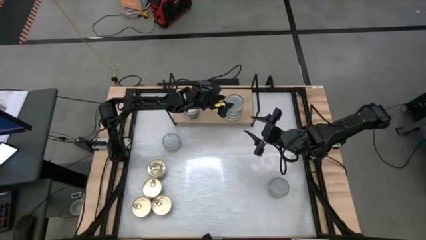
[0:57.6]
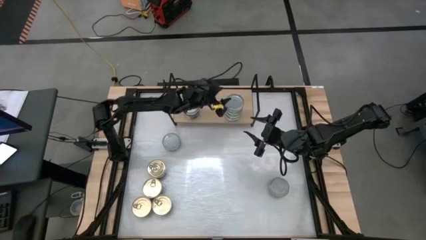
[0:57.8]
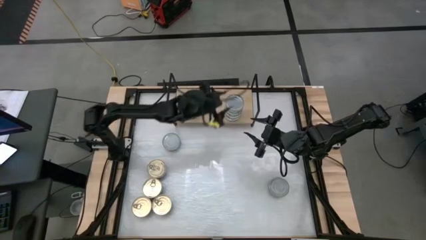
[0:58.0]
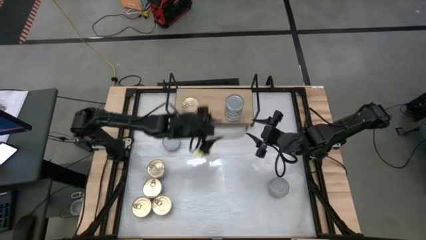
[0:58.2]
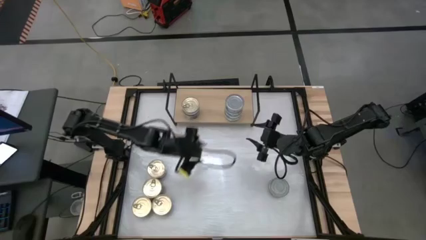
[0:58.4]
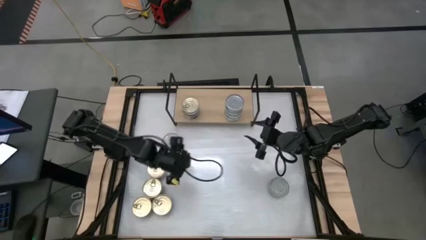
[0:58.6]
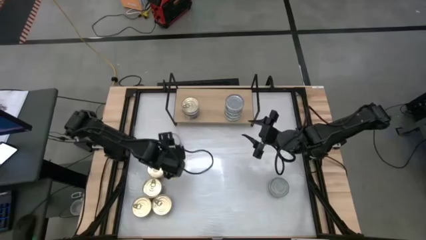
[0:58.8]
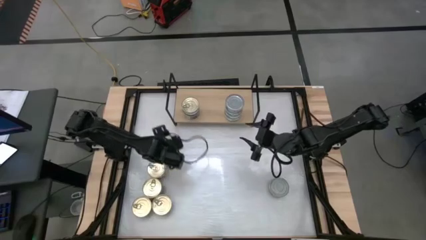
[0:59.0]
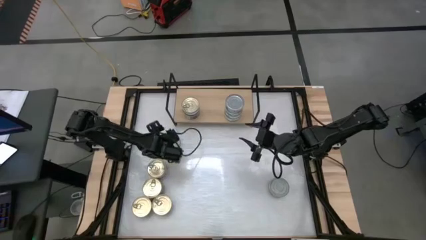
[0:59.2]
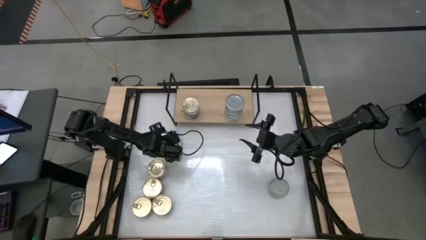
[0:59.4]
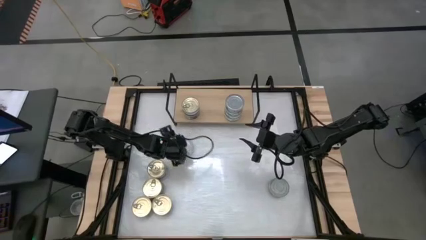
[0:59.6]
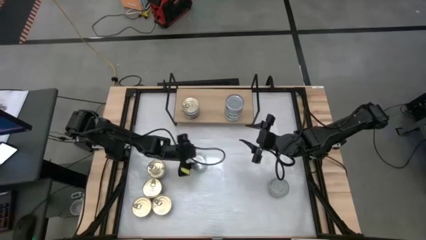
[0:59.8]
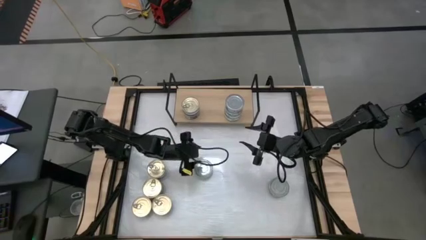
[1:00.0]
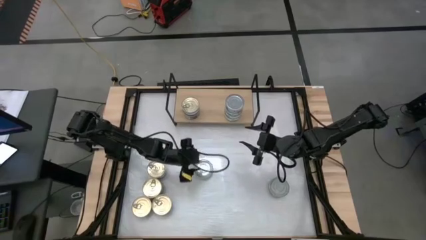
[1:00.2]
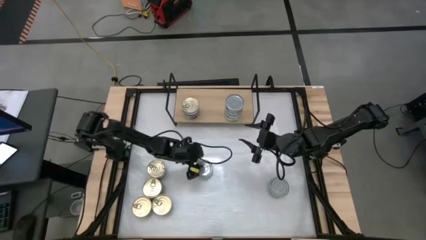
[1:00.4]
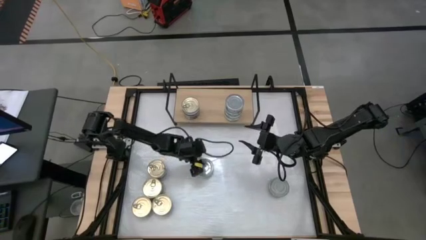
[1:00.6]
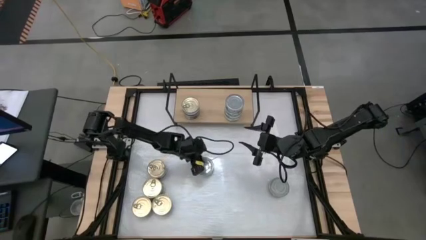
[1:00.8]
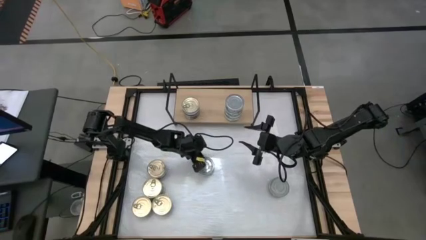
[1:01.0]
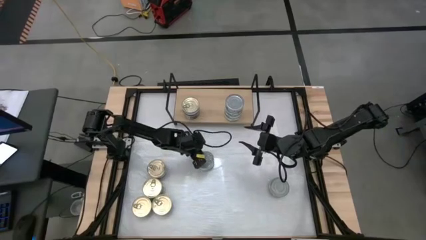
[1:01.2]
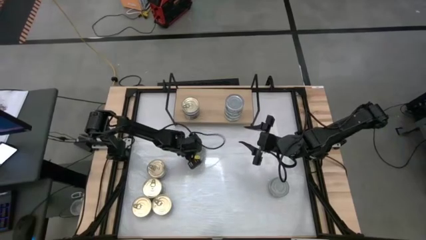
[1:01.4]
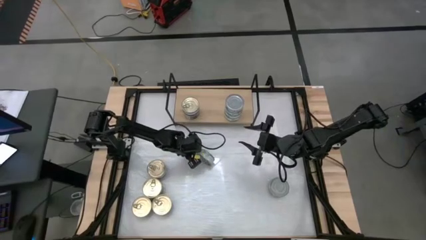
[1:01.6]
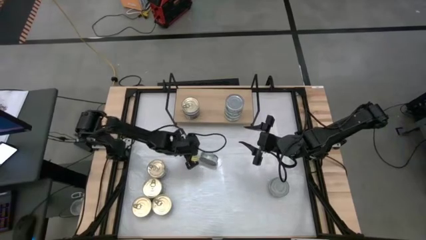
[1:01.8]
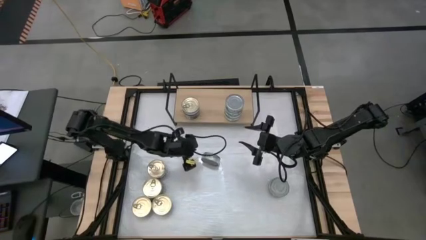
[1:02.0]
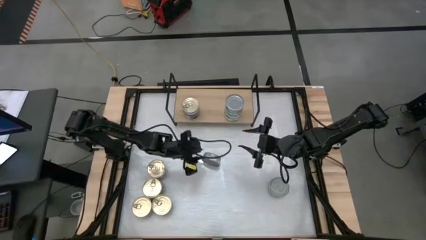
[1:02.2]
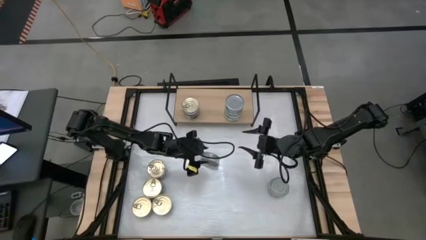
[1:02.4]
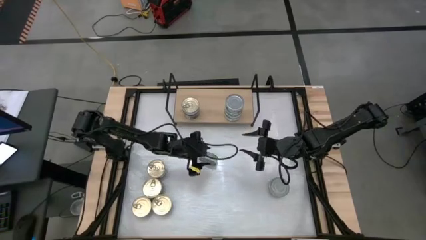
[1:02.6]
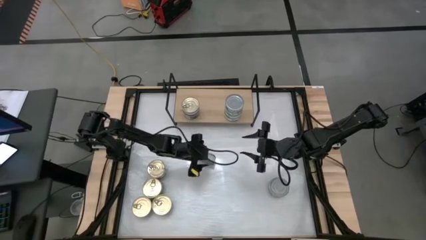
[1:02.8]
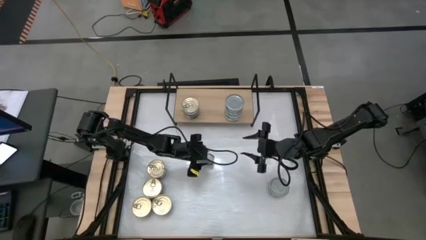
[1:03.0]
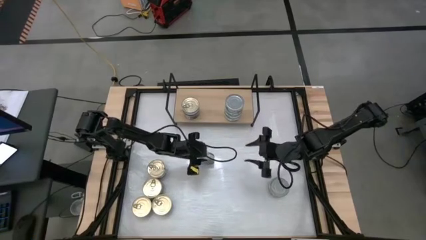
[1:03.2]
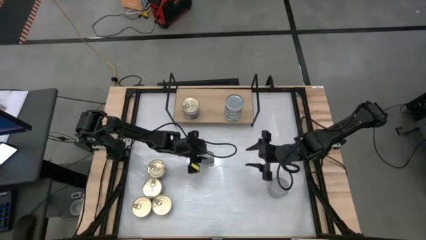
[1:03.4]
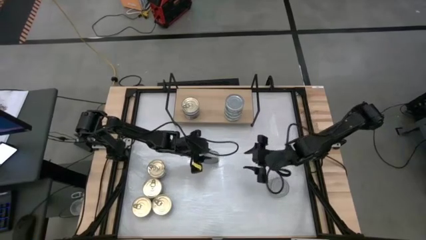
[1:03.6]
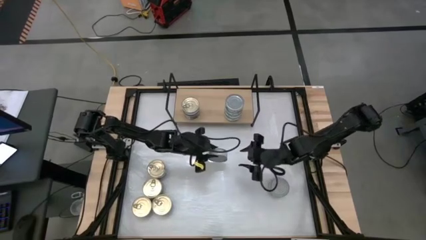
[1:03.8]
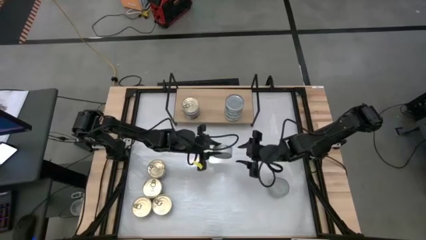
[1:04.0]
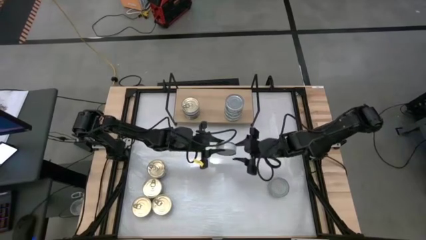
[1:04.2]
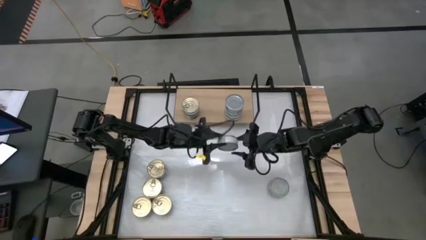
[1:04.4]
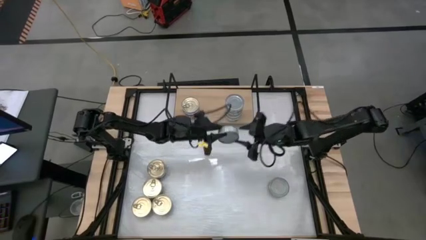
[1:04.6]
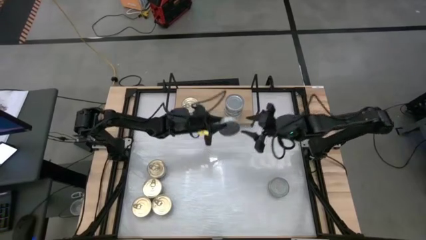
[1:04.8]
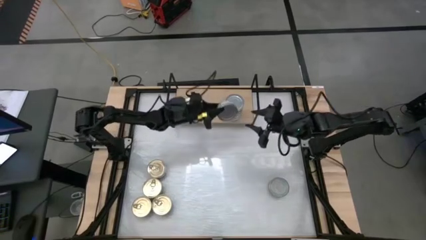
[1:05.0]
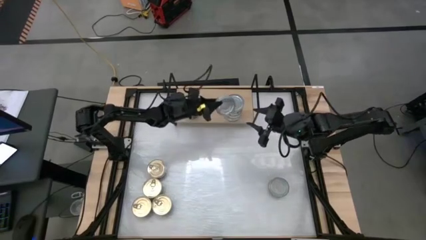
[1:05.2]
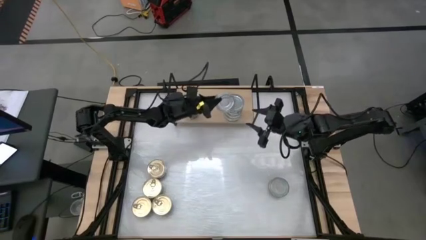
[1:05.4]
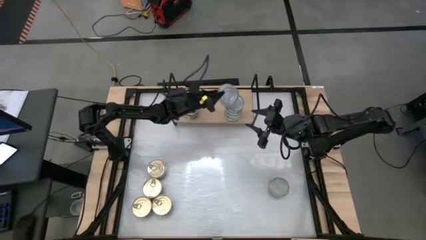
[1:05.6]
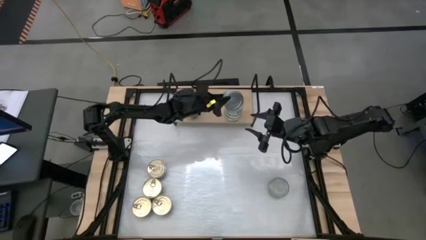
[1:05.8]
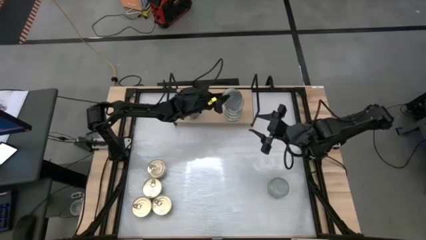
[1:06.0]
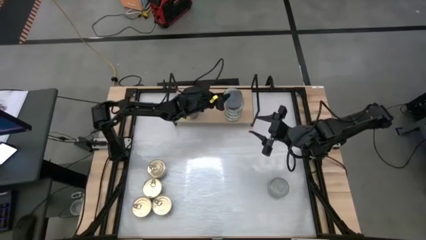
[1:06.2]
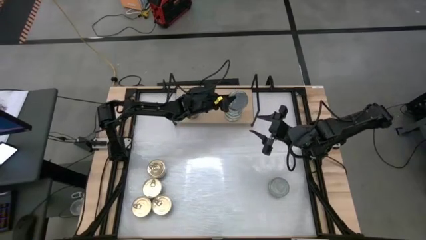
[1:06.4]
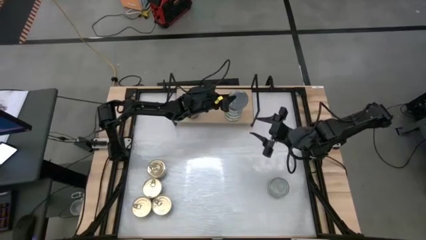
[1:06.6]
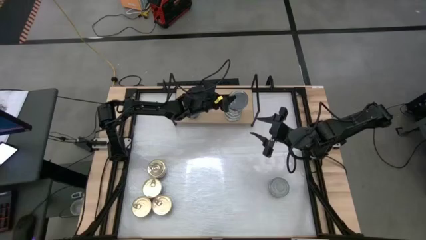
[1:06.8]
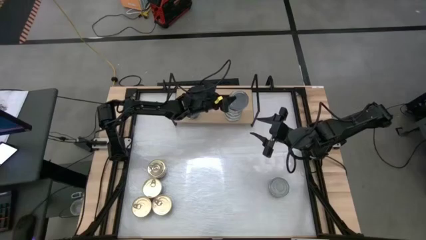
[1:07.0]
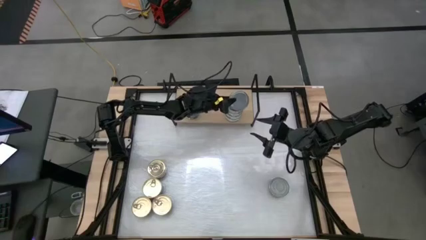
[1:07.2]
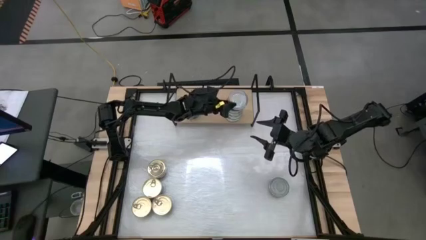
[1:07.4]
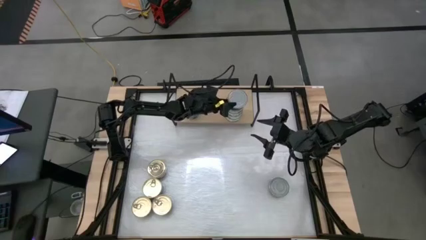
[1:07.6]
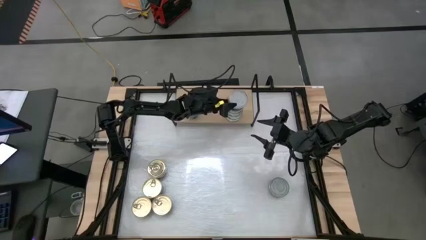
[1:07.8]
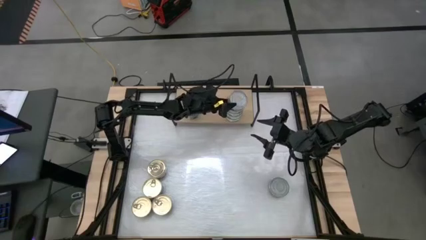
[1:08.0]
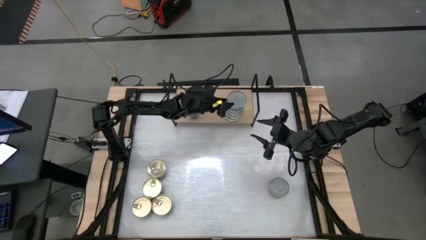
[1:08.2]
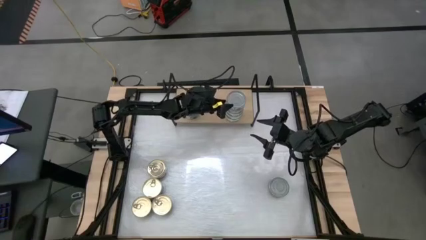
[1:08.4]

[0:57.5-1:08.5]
Task: Stack canned seafood by type on shelf
Stack the green tuna can on top of the green tuna can on the shelf

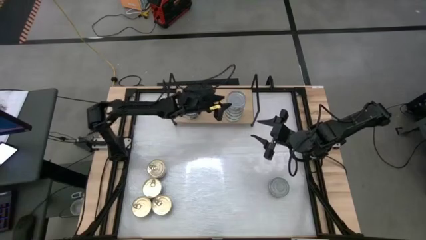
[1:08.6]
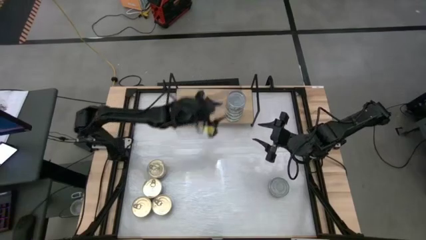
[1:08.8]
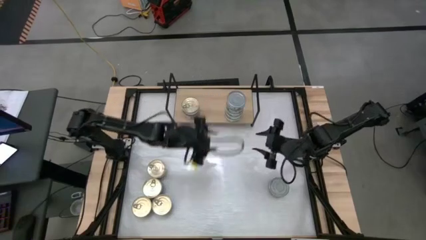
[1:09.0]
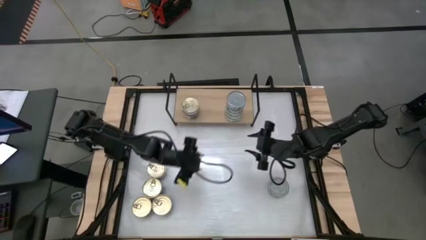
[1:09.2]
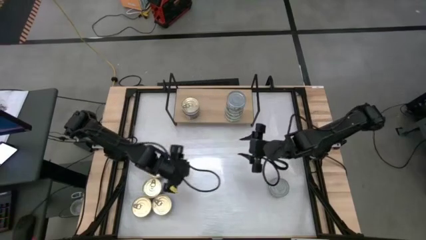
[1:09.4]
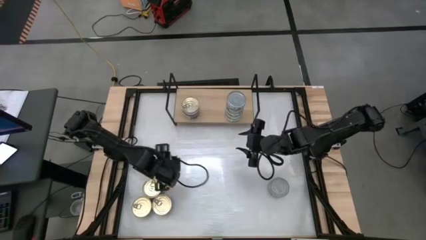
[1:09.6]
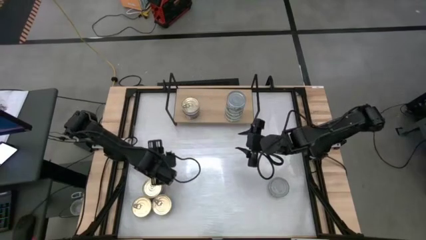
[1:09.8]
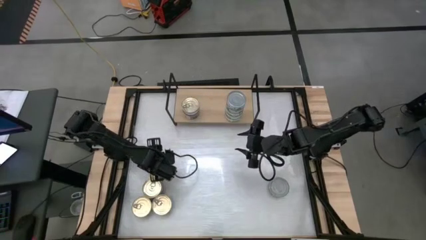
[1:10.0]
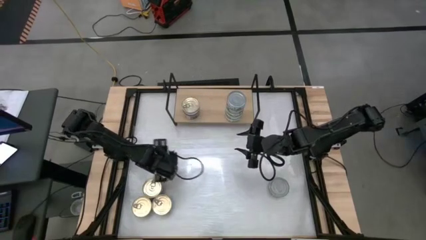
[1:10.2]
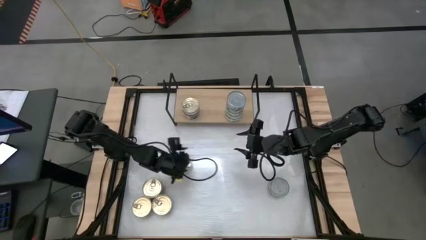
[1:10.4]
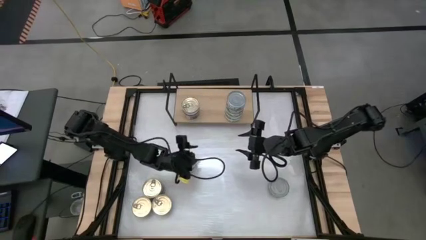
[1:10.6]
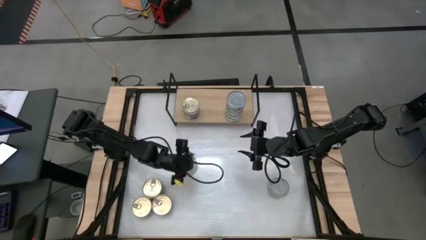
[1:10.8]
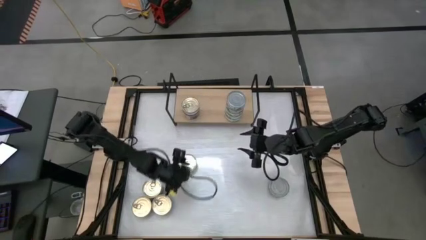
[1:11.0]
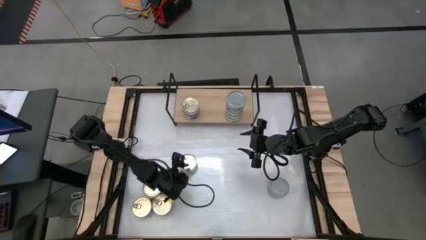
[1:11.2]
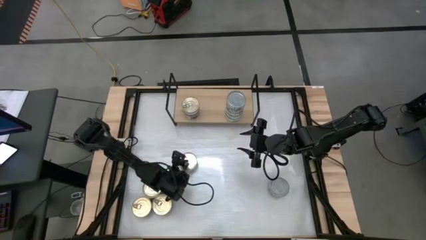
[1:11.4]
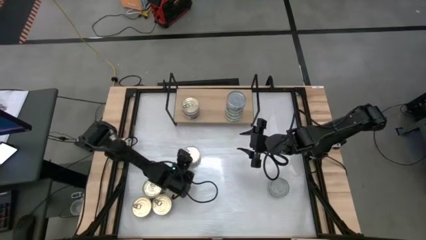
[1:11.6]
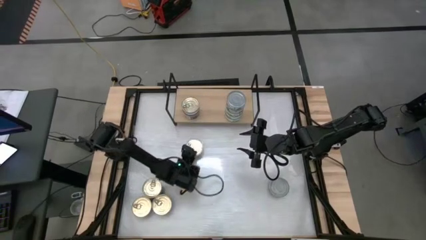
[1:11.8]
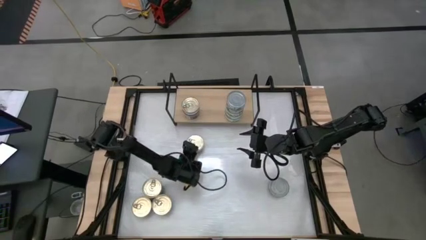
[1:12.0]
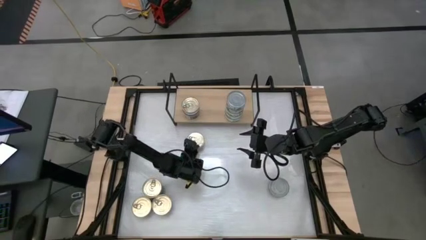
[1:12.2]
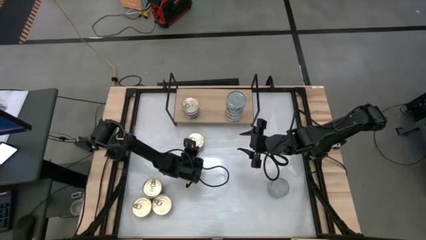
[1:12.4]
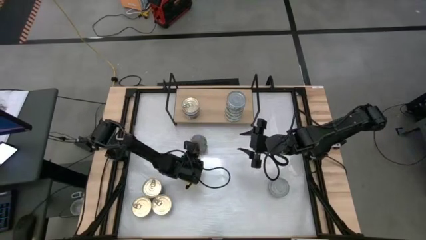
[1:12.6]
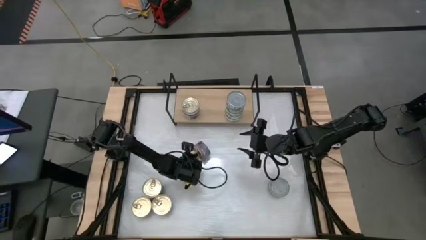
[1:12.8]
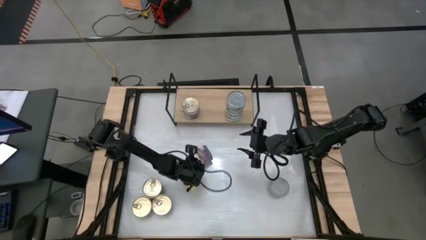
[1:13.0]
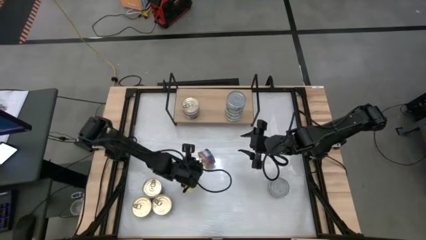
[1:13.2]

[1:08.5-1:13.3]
Stack the blue pink tuna can on top of the blue pink tuna can on the shelf
